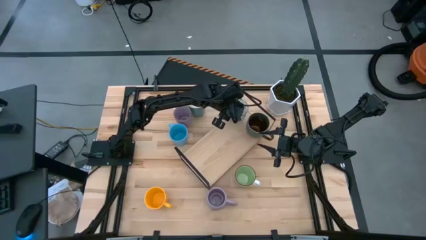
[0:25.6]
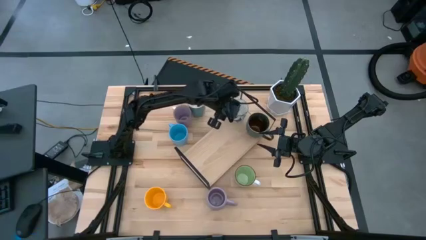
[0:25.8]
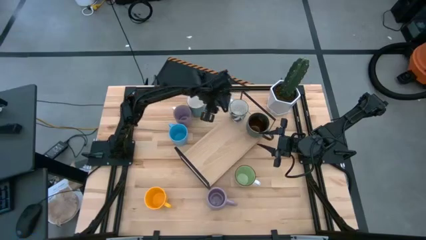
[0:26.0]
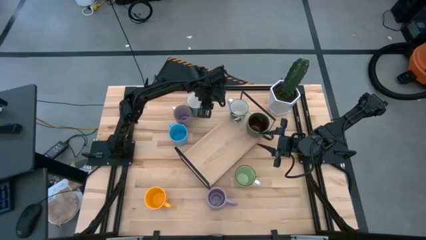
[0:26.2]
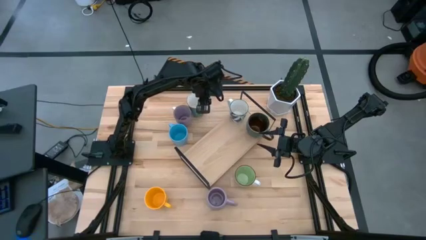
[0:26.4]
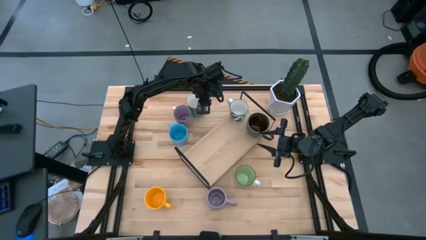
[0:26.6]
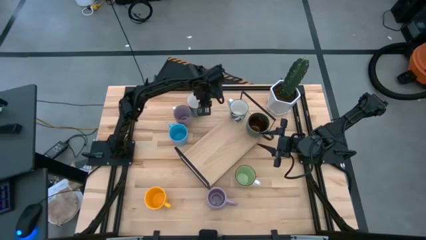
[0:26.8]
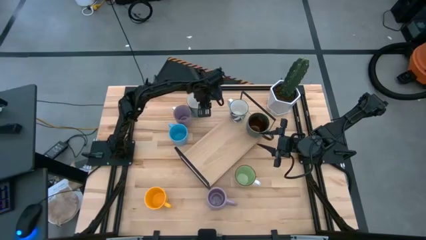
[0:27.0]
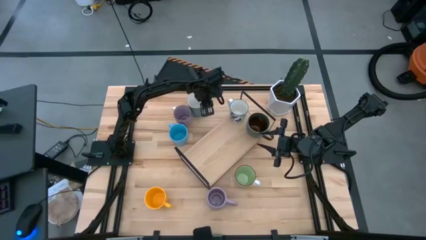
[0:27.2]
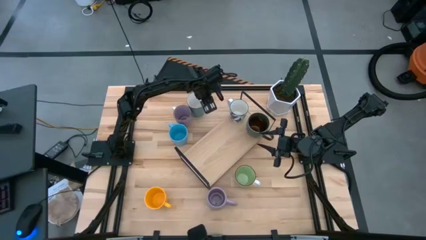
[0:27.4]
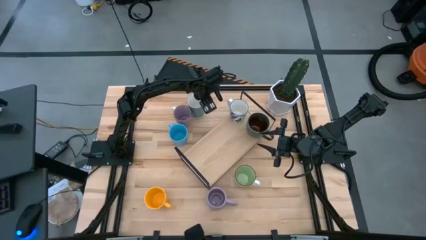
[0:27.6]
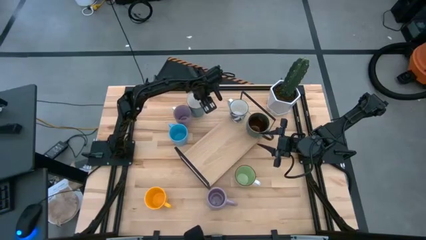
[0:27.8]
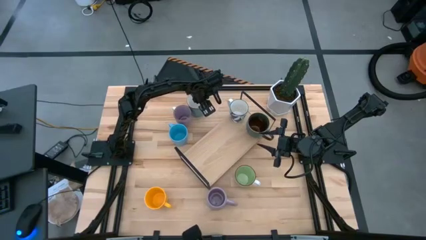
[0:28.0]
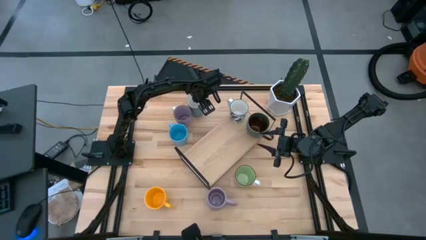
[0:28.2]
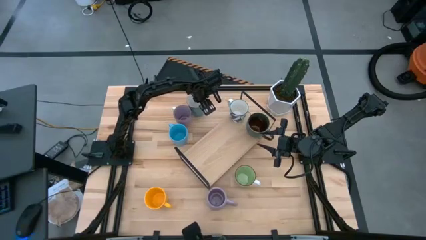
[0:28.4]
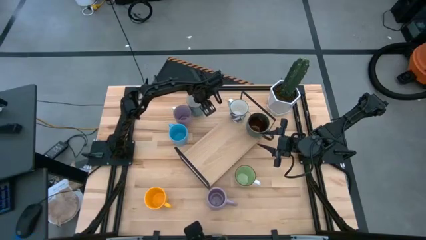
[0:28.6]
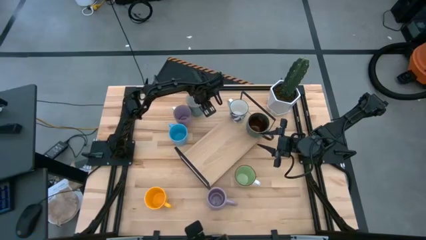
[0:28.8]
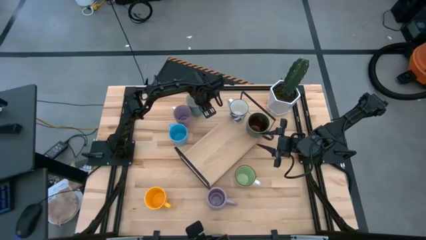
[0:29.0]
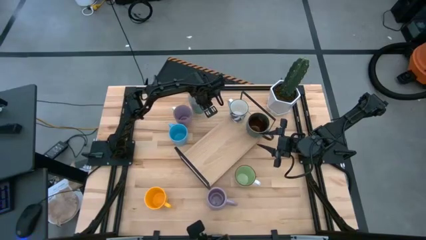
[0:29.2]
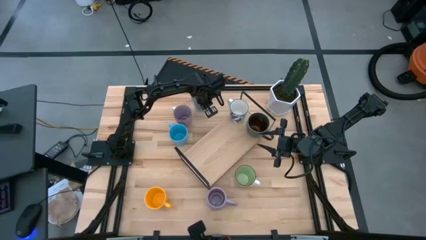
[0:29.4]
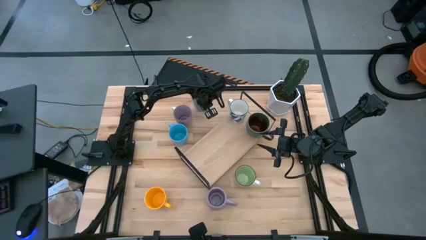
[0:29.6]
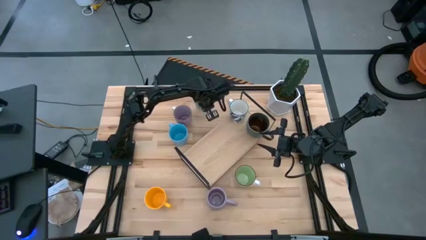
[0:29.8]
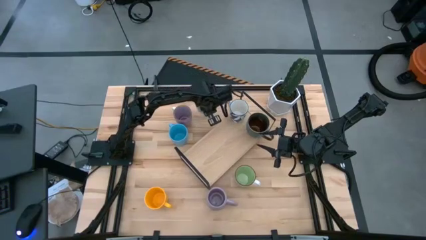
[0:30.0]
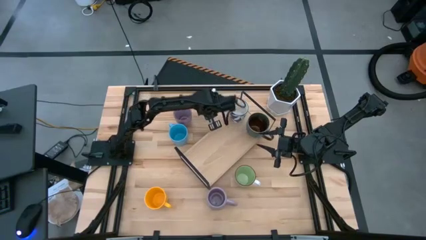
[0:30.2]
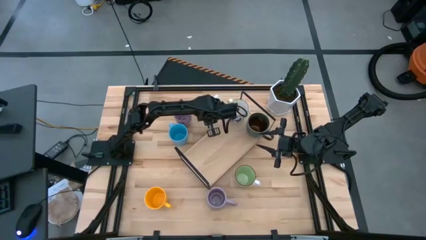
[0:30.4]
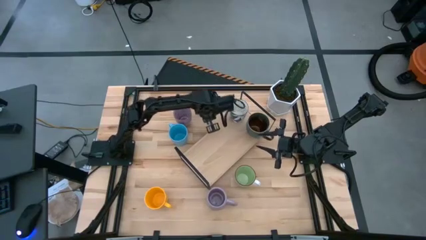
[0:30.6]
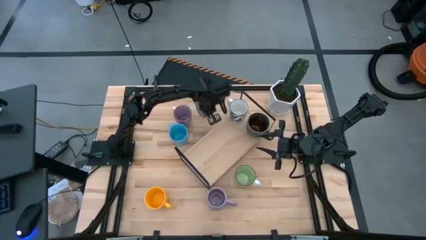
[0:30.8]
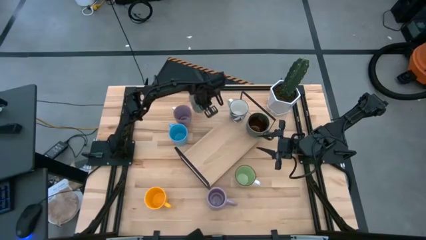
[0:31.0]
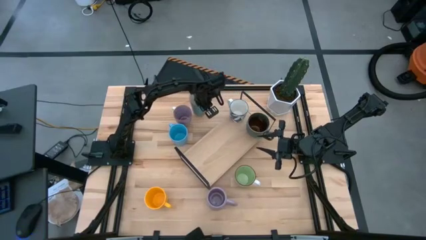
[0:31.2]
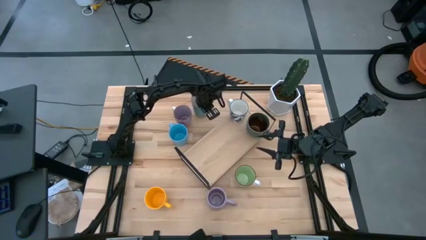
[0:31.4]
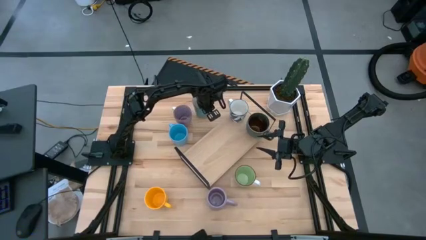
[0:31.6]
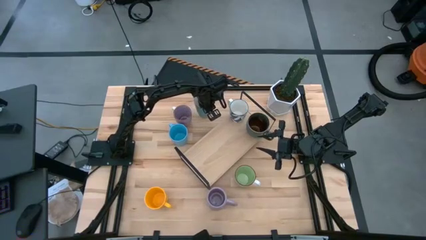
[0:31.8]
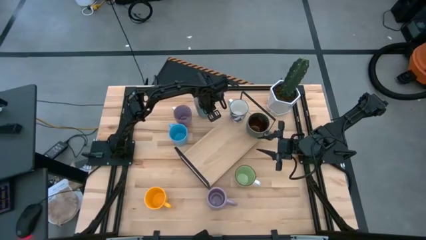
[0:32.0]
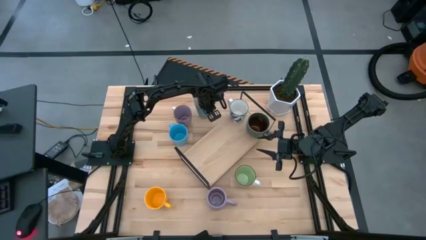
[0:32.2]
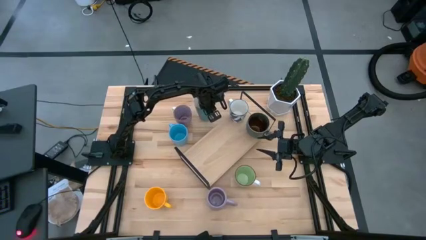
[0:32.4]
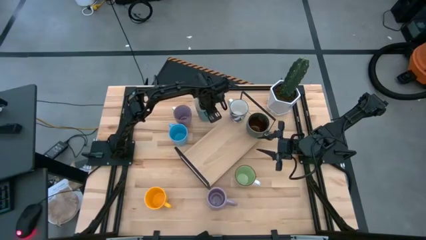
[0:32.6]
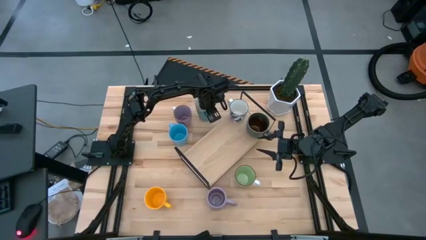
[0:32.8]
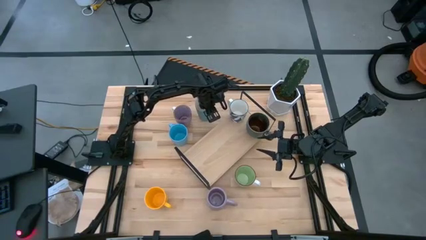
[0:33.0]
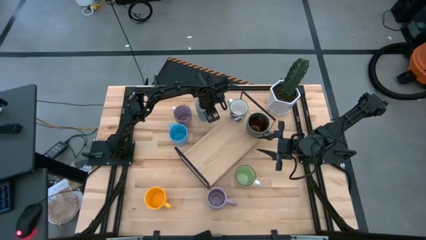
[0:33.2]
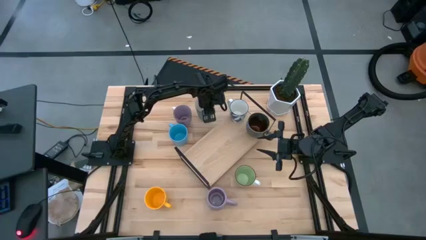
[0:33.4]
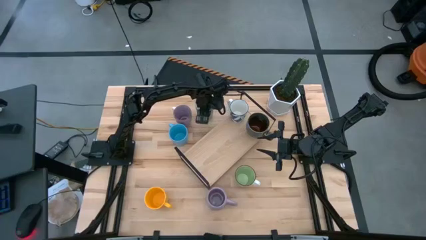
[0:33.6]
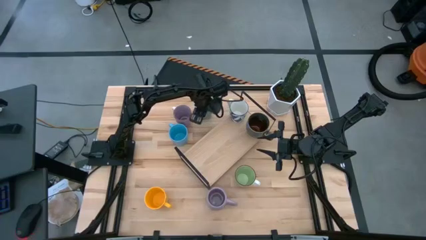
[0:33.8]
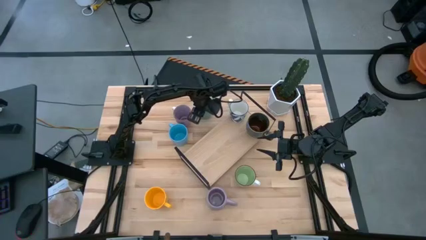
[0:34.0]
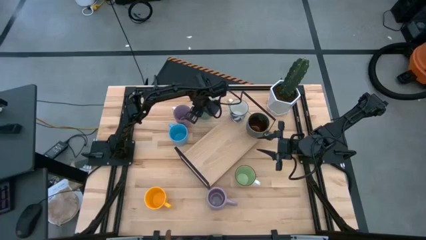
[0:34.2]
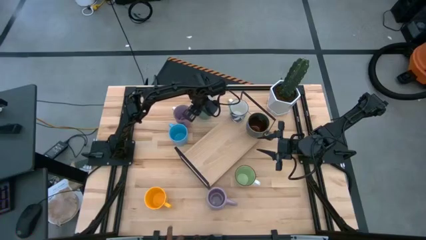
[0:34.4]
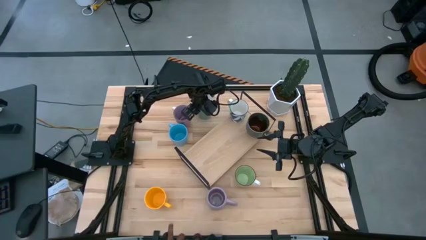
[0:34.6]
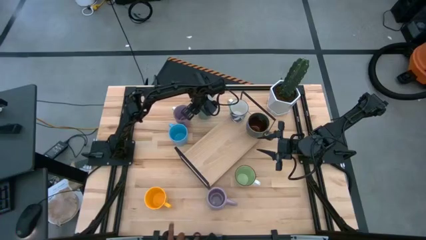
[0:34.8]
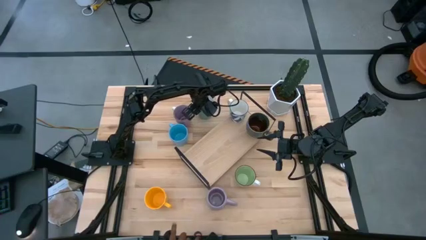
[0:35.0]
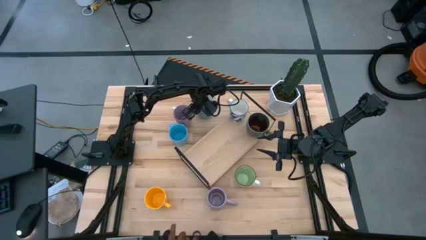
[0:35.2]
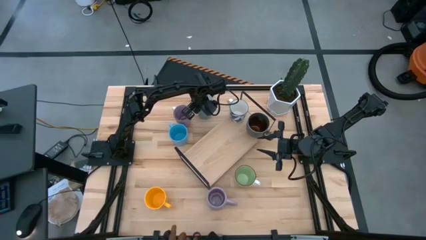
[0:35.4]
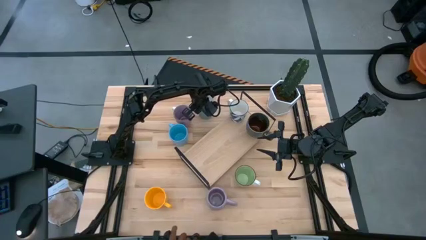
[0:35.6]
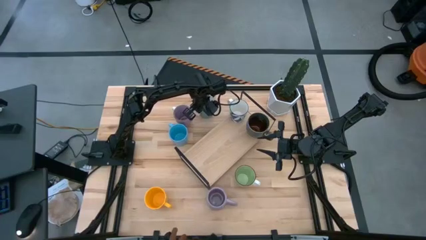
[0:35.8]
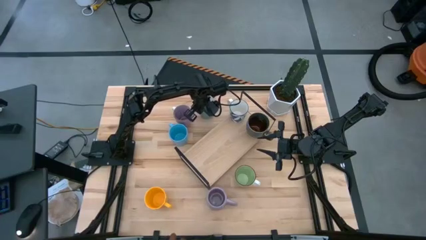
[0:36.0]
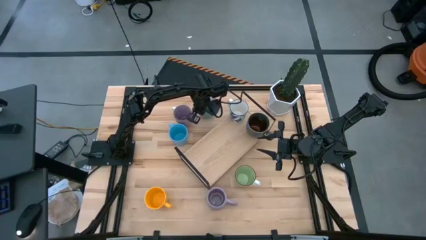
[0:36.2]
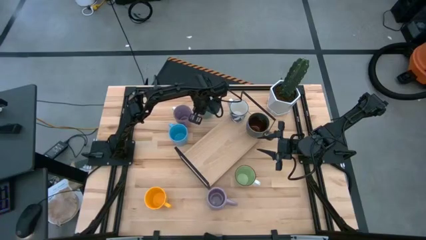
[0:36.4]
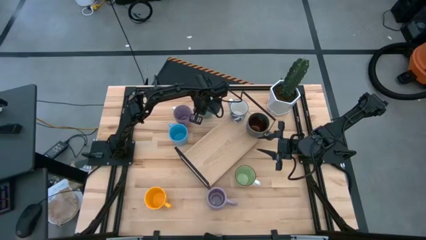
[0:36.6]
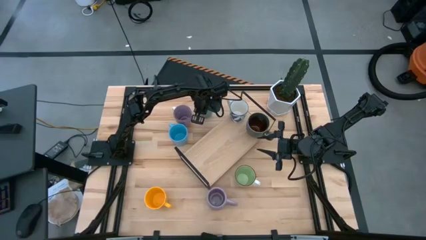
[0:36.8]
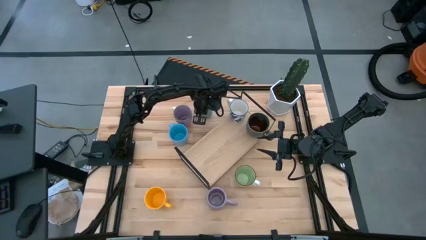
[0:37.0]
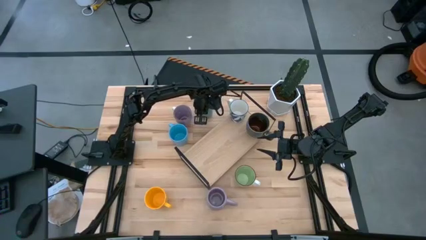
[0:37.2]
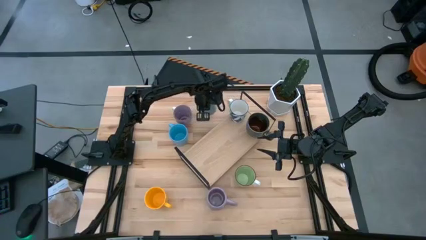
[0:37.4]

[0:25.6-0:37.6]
Task: Place coffee mugs
Put the light green mug on the shelf

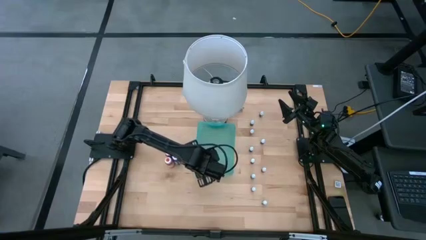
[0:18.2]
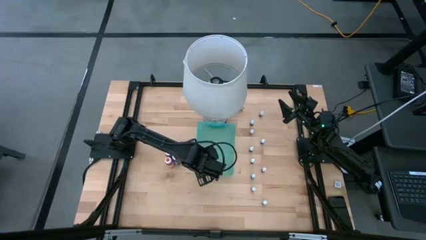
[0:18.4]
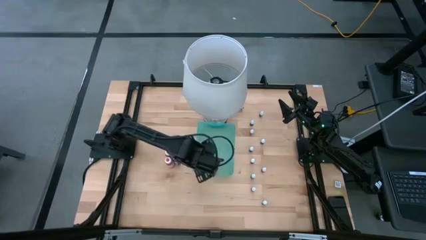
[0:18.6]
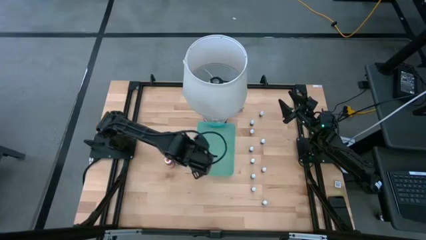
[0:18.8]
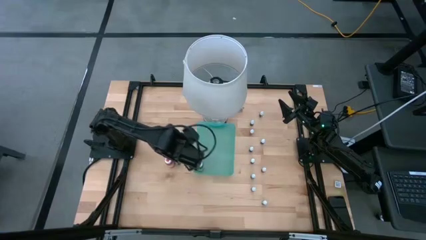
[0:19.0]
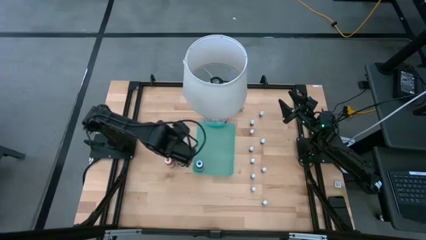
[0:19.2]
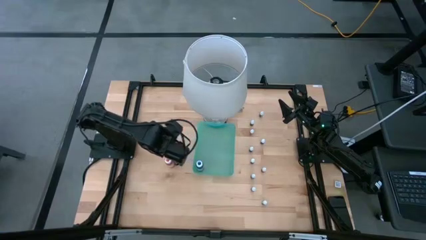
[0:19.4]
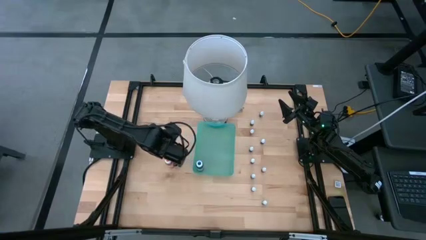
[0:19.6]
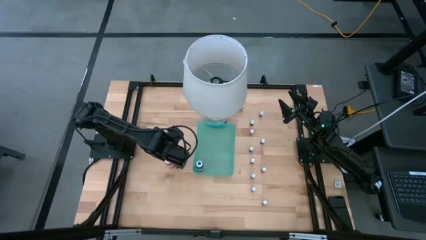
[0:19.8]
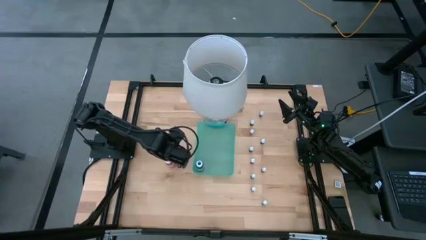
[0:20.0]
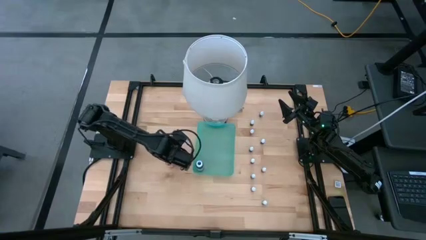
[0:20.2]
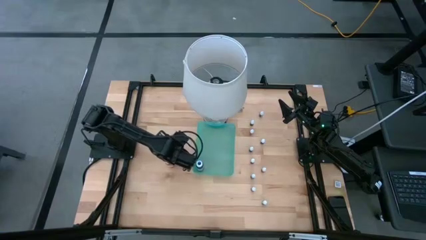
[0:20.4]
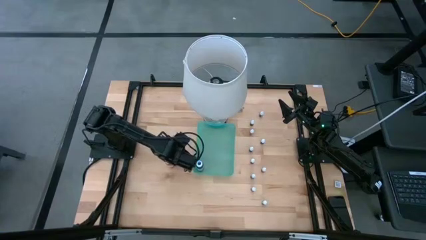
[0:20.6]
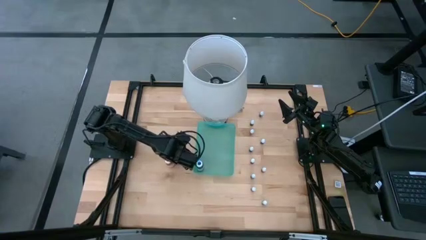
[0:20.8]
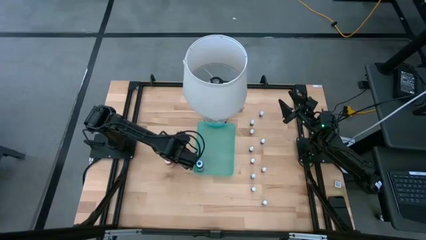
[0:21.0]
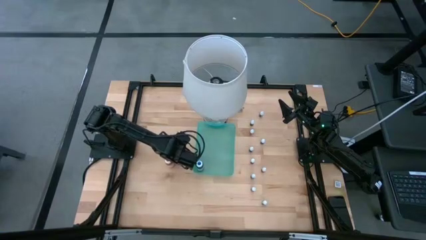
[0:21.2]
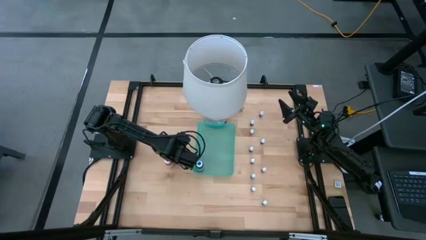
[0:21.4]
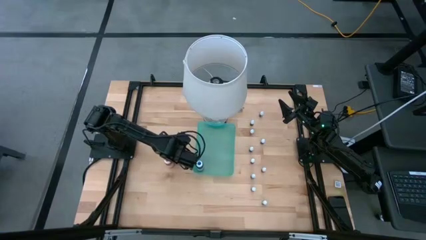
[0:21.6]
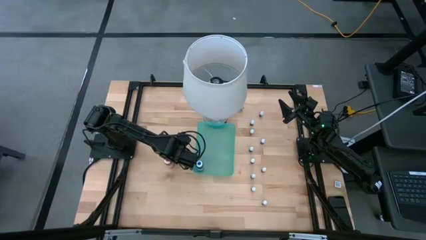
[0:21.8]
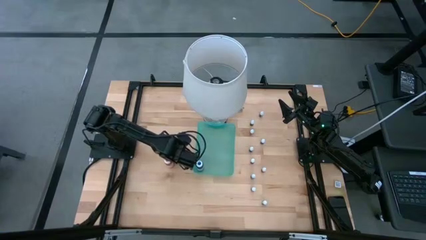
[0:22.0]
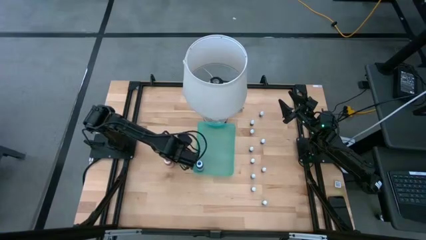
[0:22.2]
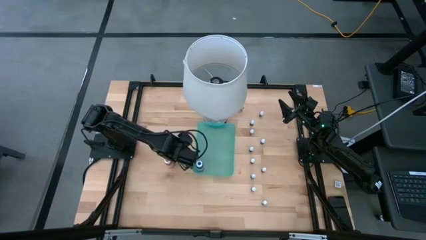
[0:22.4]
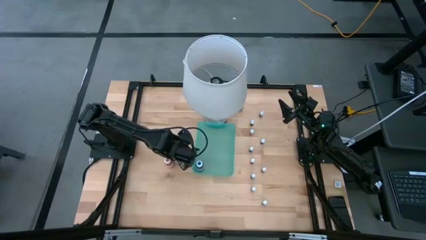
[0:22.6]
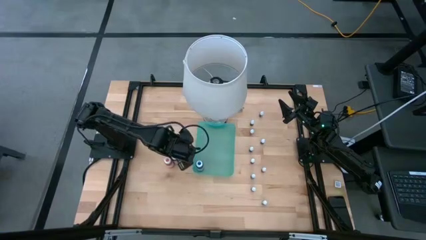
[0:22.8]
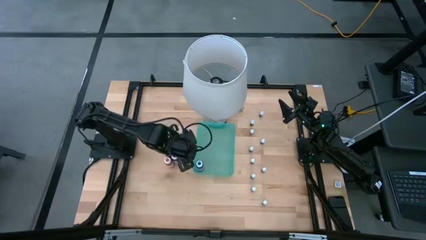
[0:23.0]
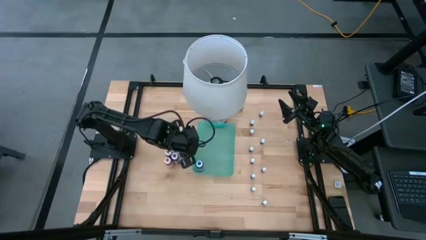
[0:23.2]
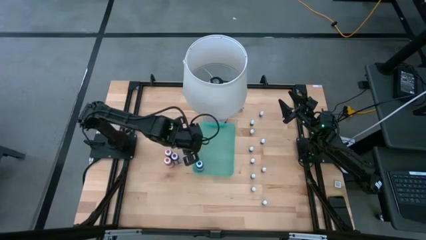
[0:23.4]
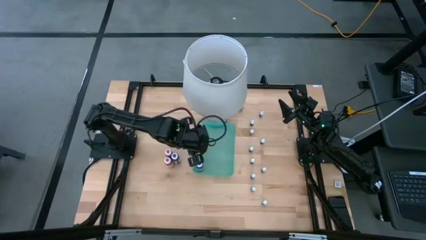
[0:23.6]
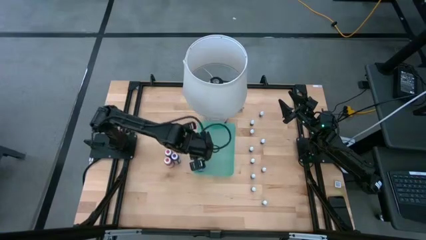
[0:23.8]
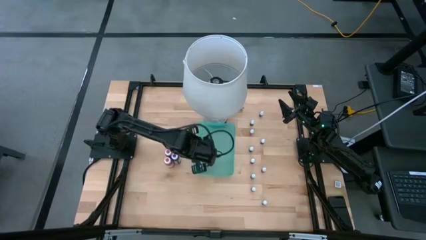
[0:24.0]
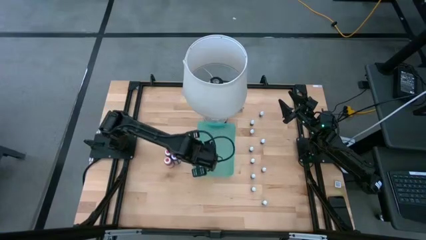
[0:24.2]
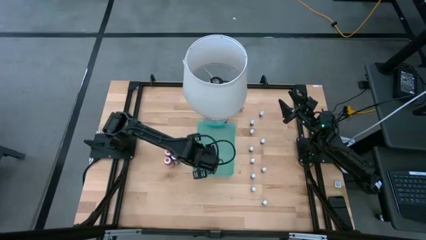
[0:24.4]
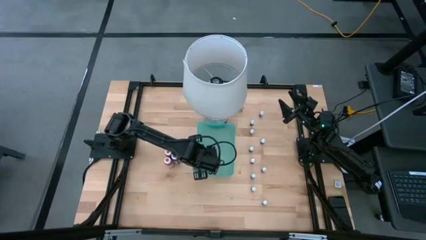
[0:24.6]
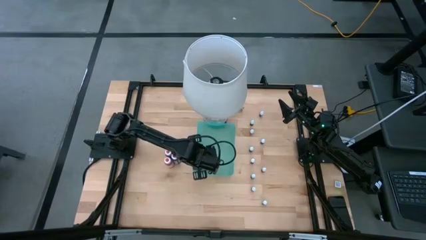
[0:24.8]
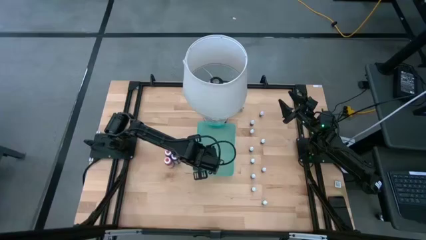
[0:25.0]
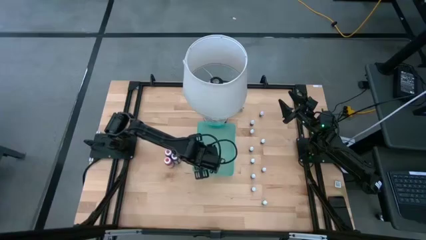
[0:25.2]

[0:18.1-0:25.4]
Task: Pick & Place food coloring
Put the large yellow food coloring bottle into the green bin
